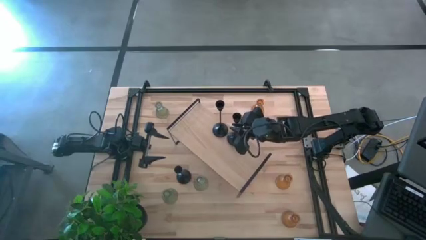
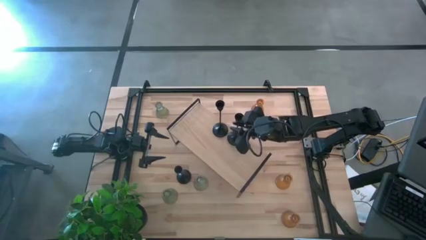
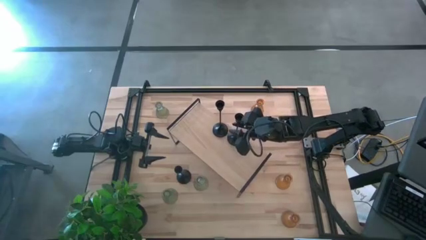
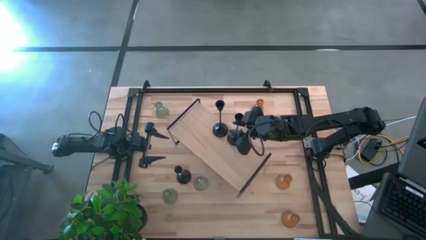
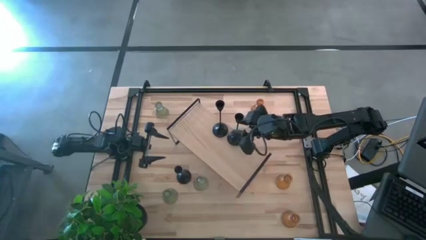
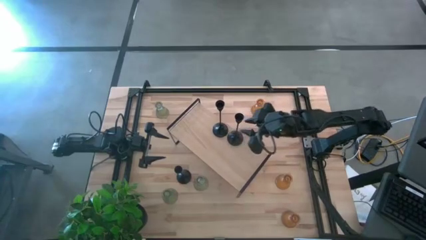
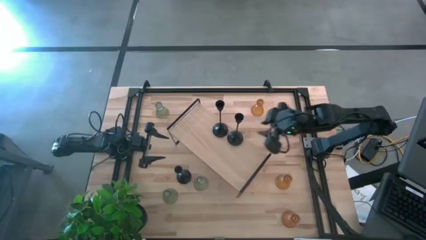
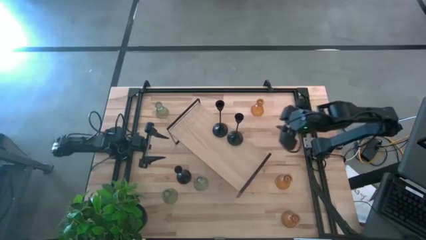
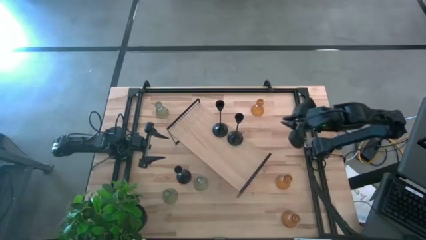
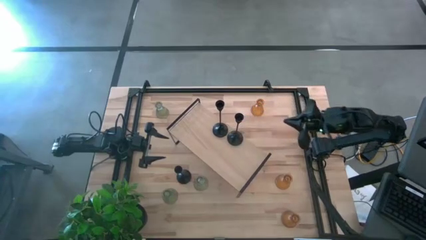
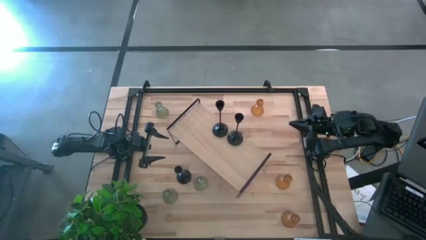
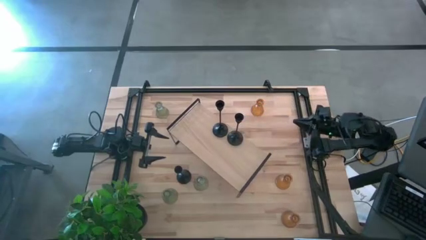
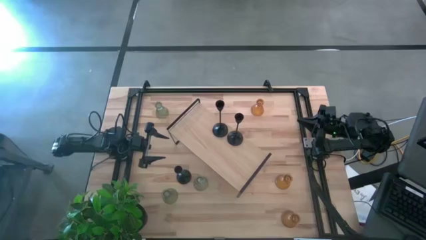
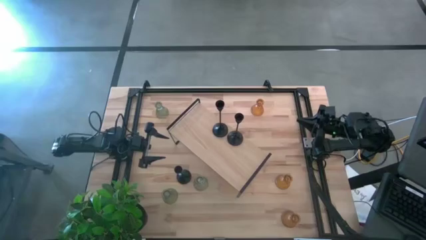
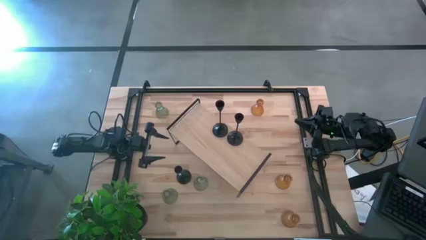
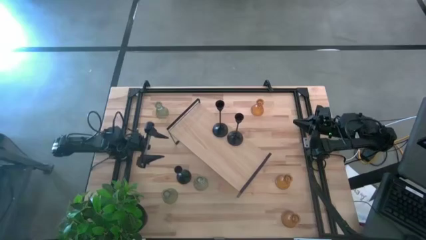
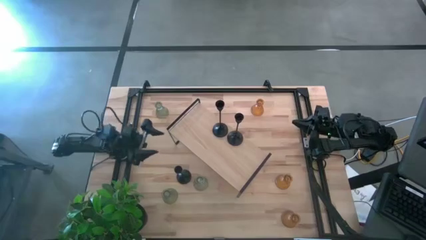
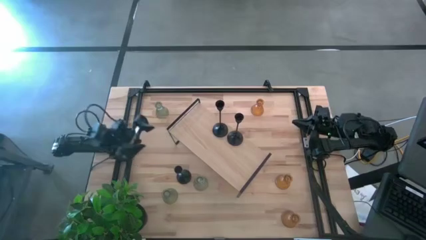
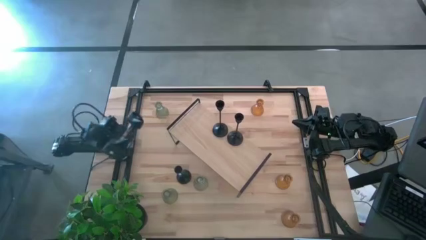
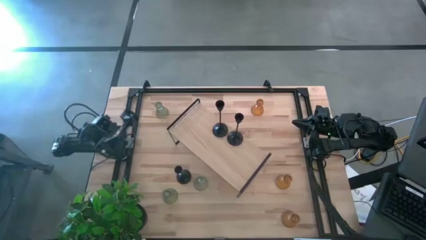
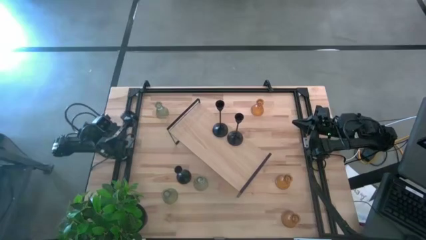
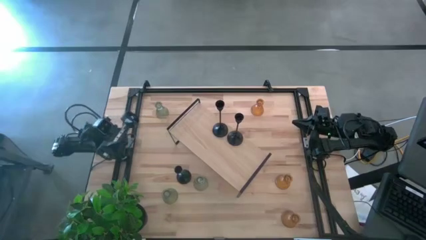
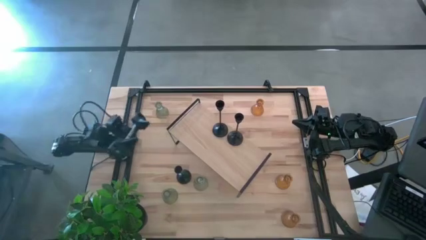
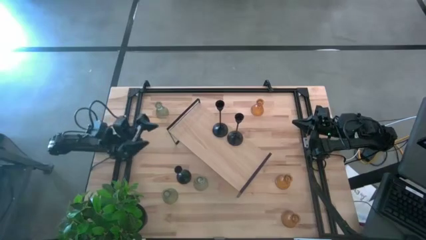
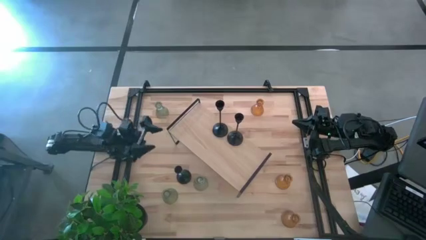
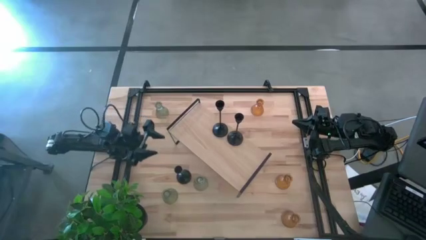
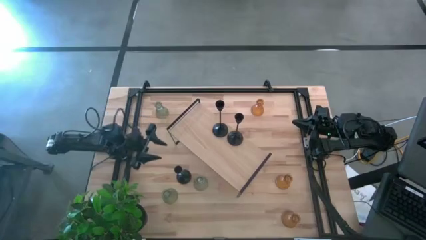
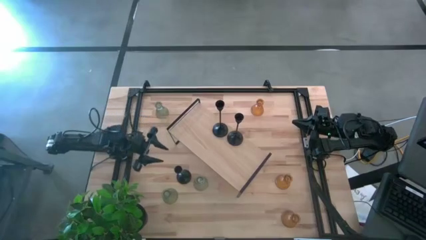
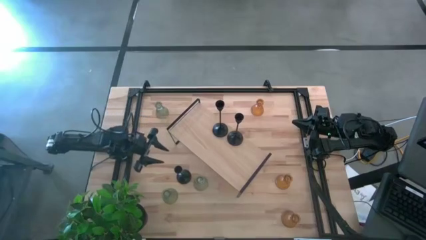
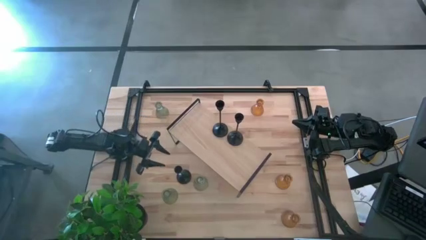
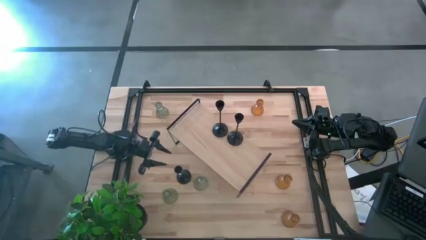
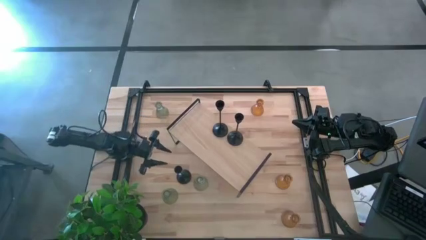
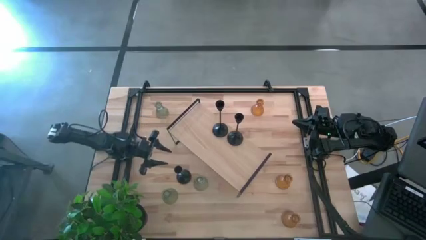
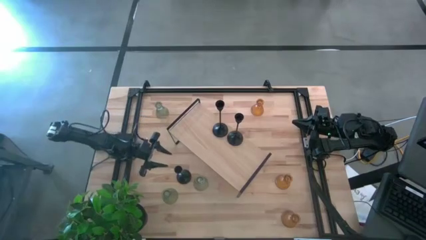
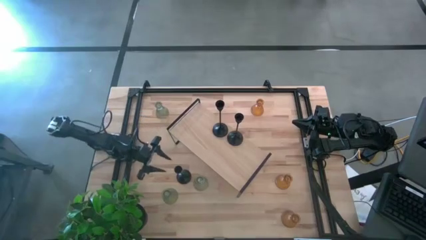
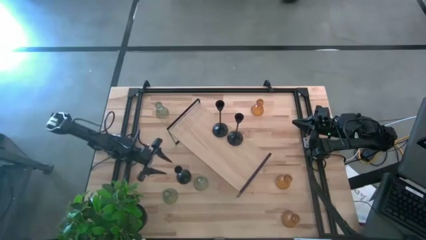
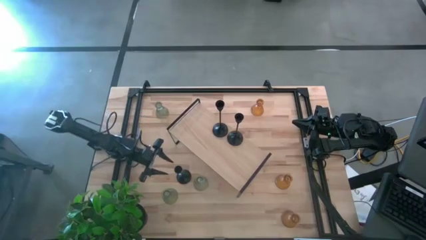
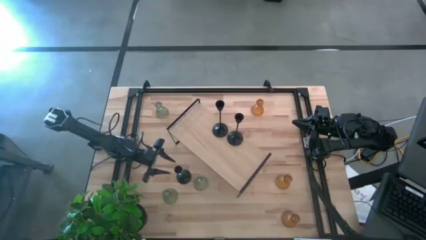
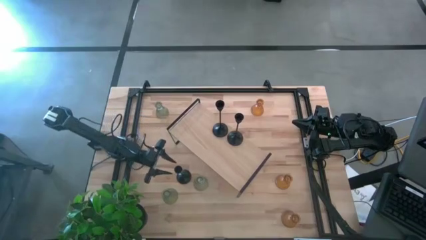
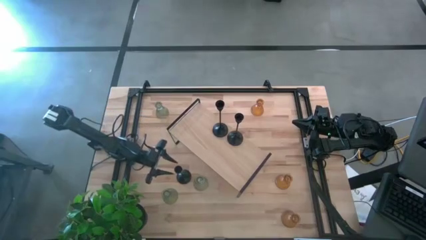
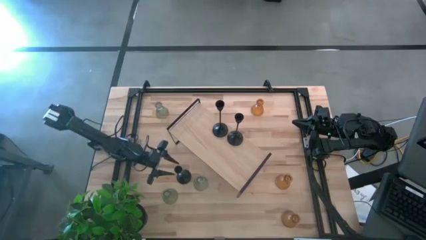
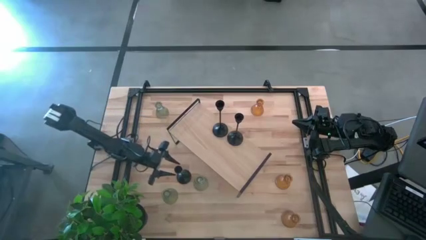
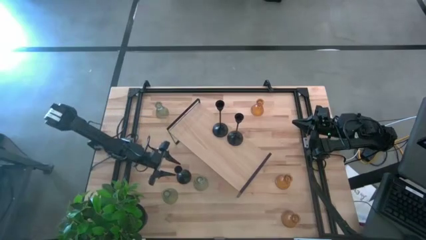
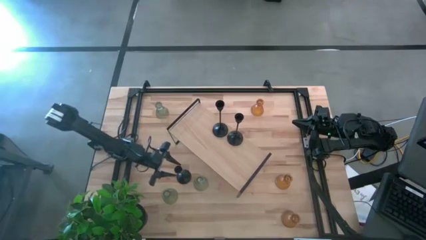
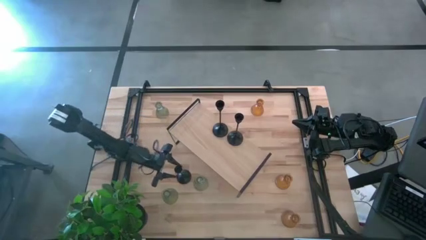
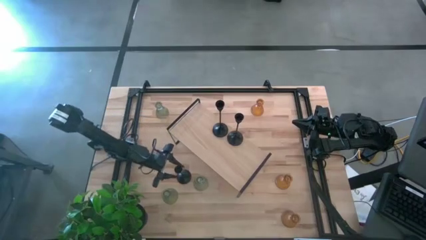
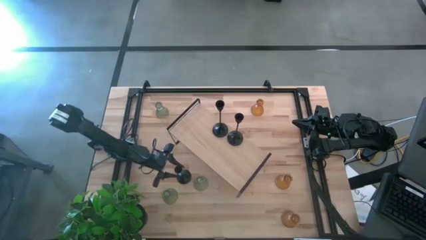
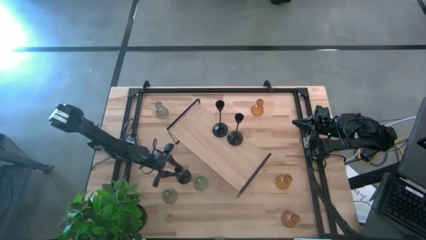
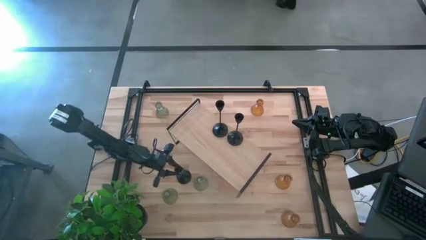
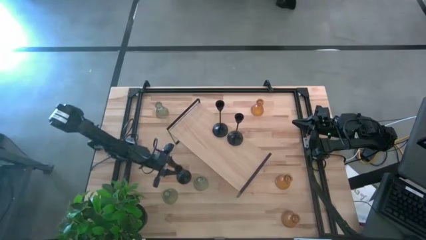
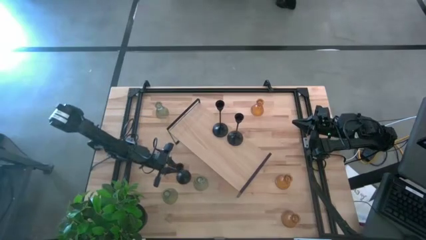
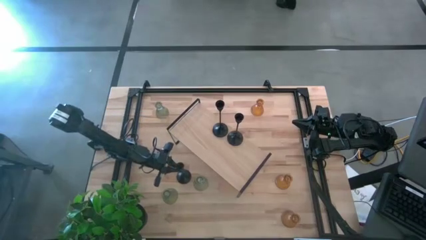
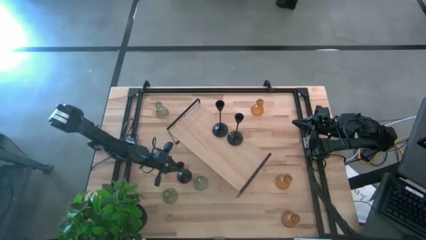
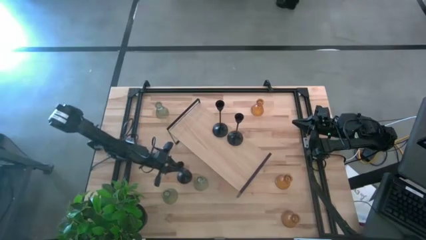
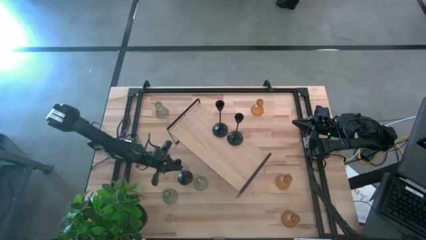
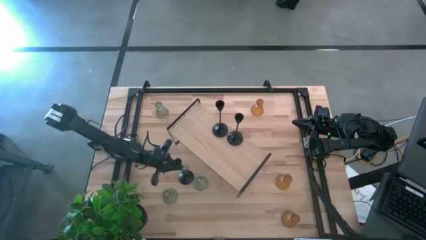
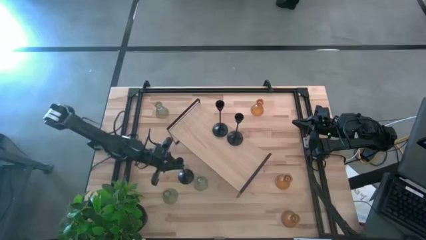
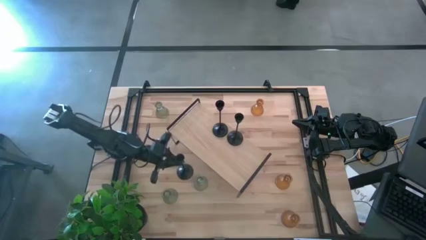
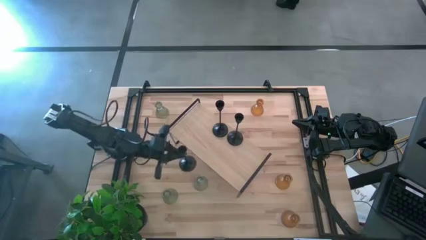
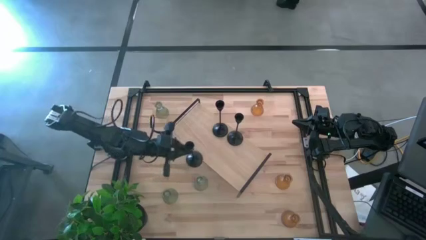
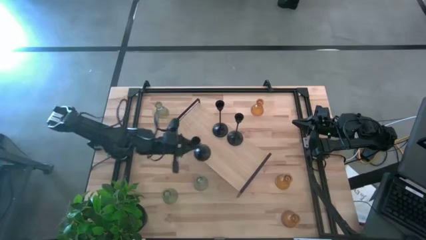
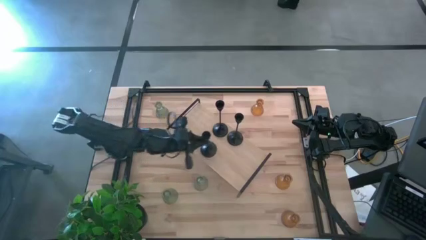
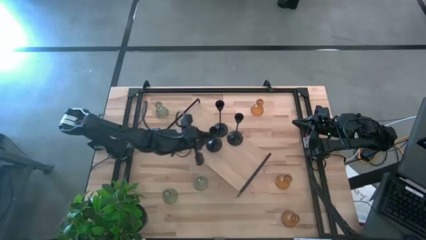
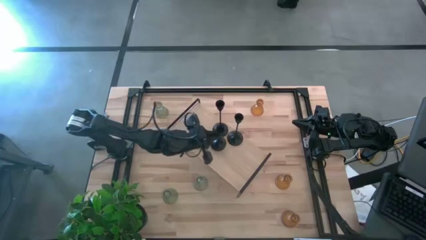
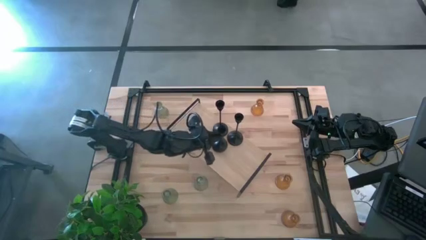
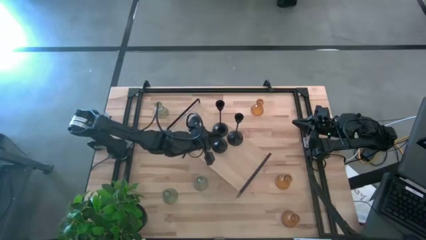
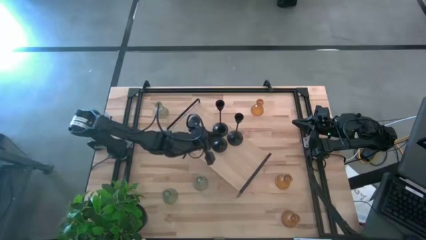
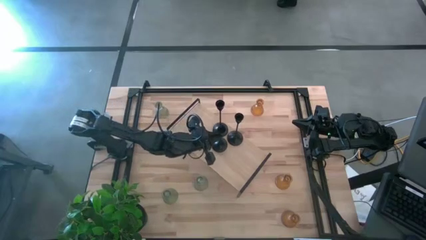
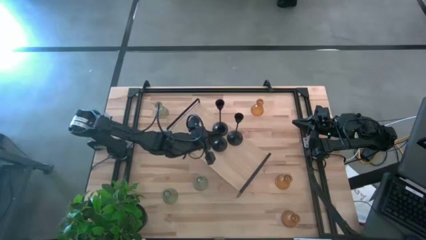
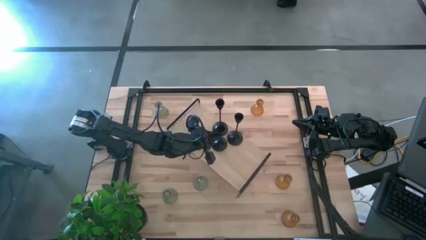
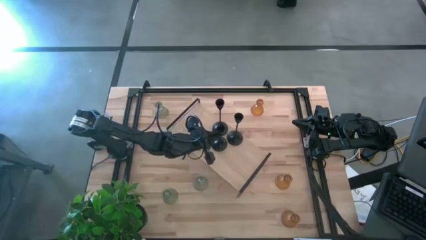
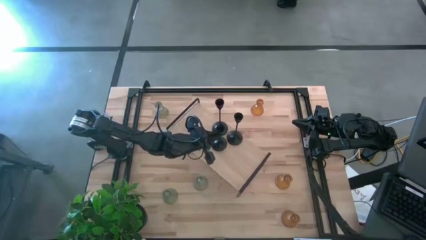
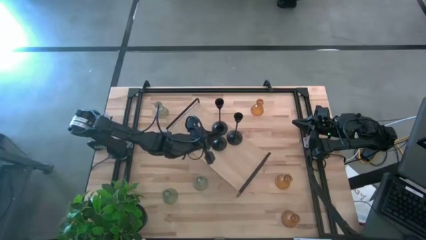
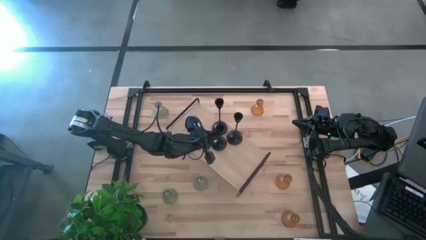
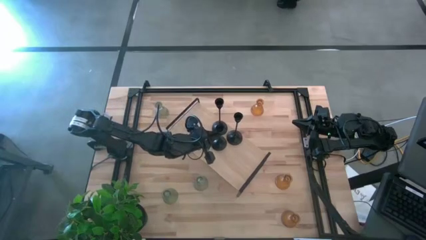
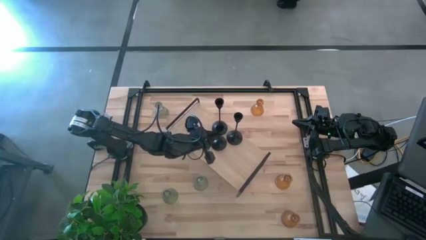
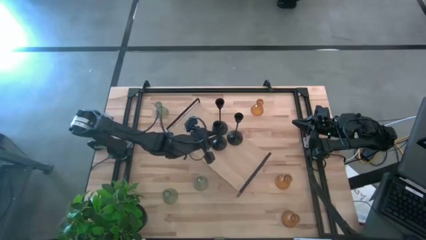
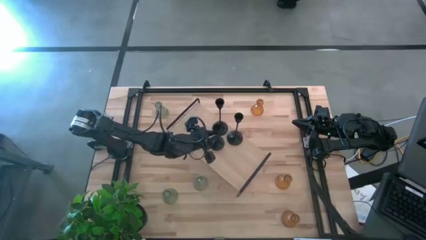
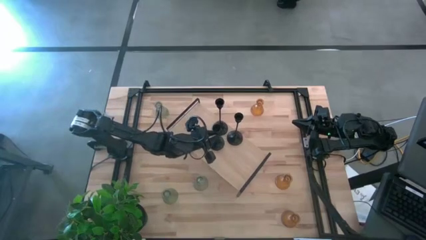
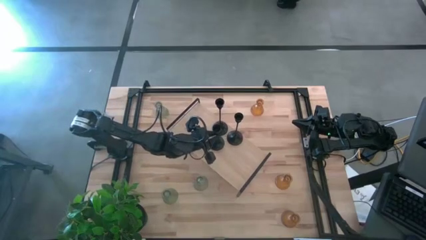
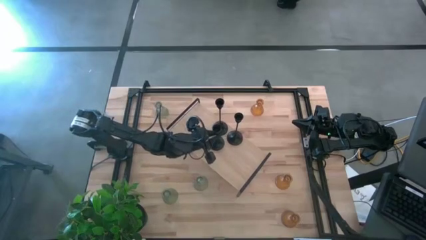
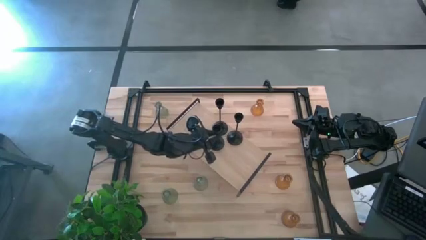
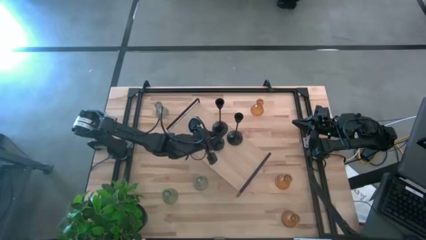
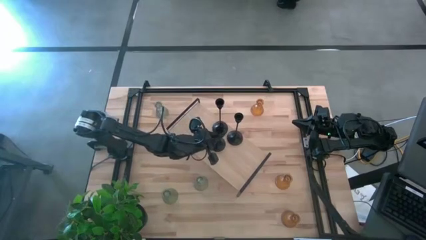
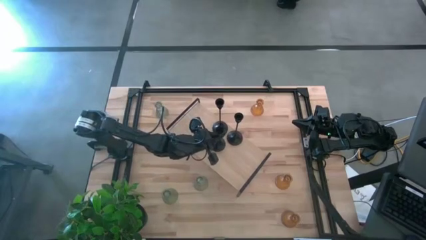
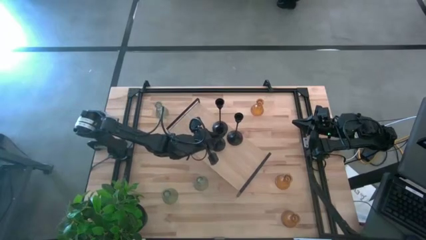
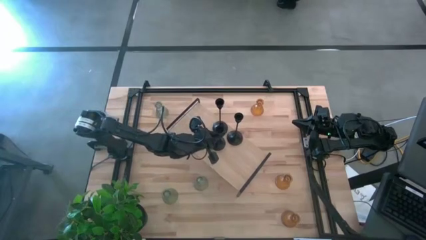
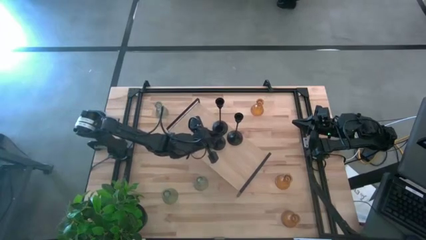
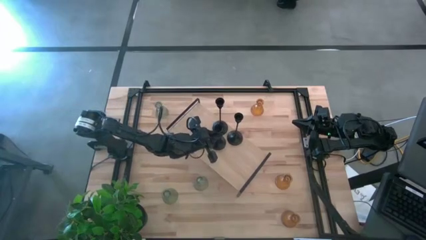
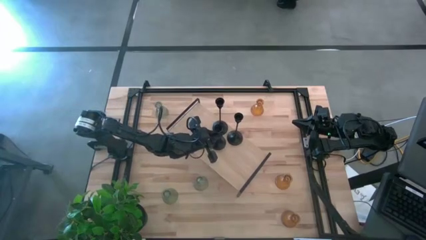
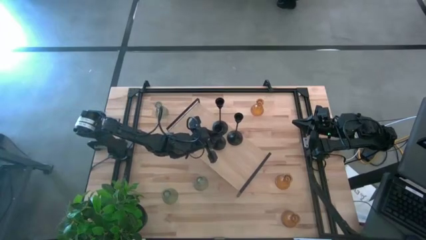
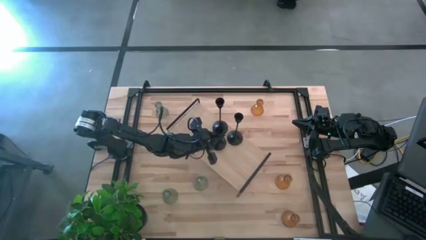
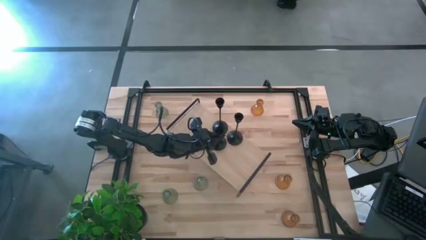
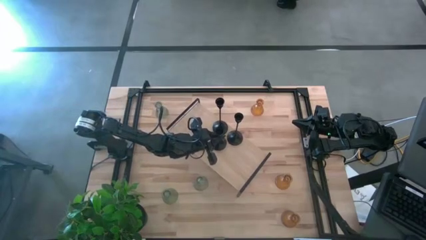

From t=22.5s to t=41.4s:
Task: Pick & Place candle stick holders
Put the black candle holder on the shelf
